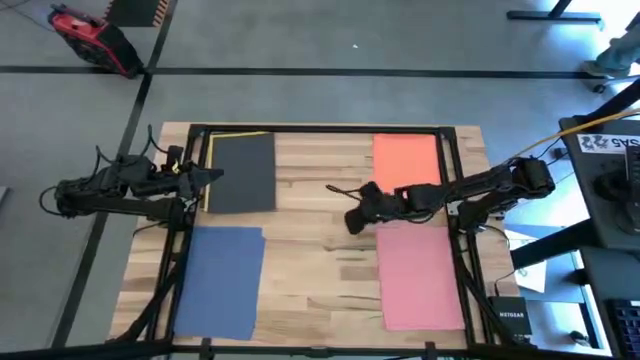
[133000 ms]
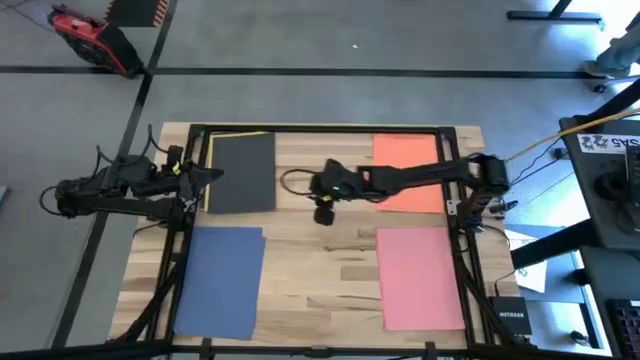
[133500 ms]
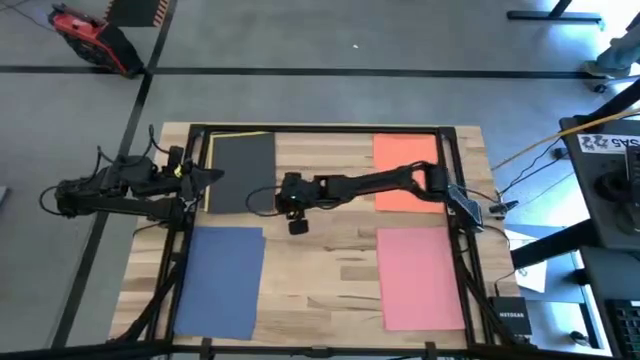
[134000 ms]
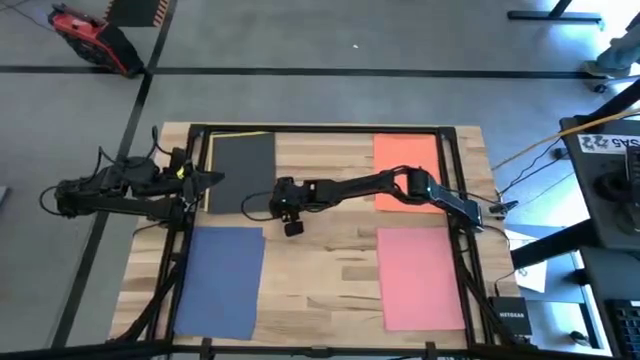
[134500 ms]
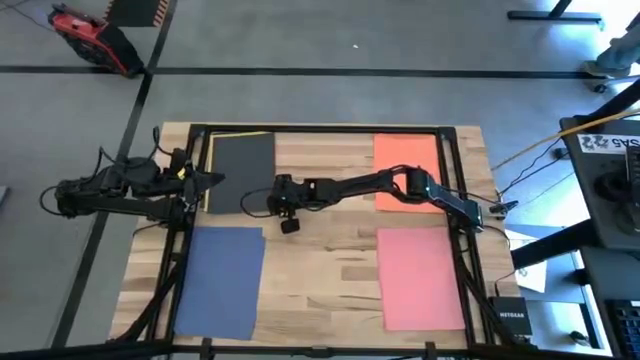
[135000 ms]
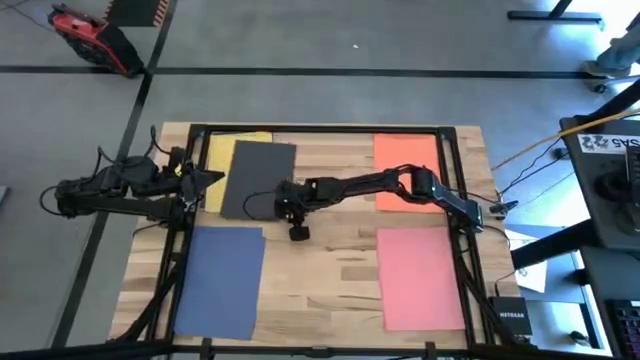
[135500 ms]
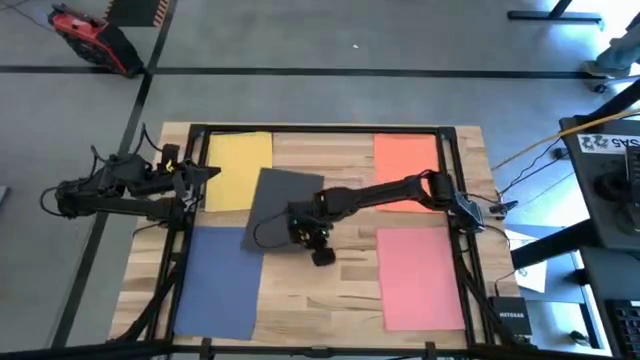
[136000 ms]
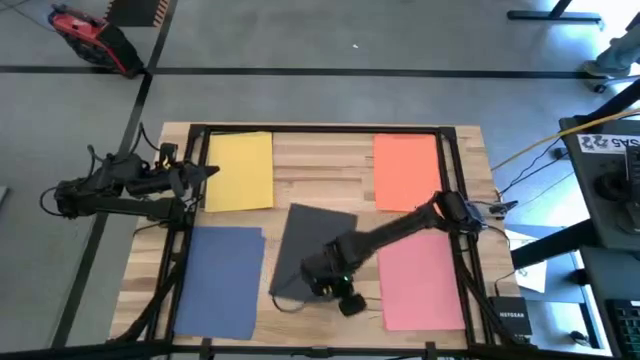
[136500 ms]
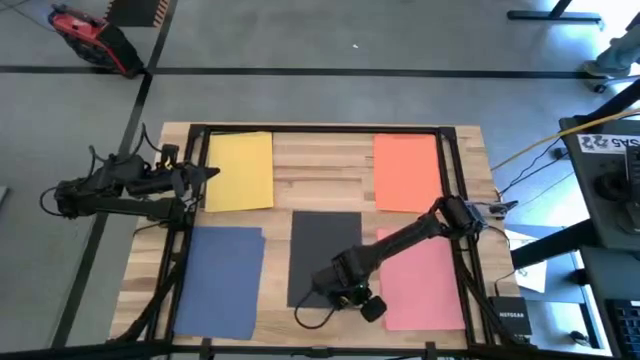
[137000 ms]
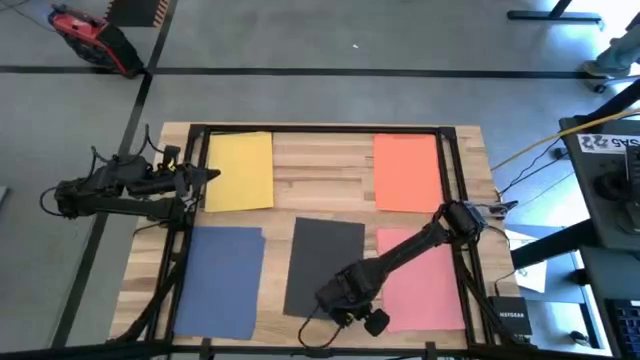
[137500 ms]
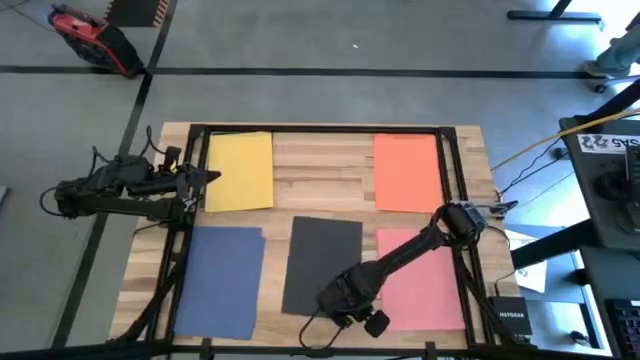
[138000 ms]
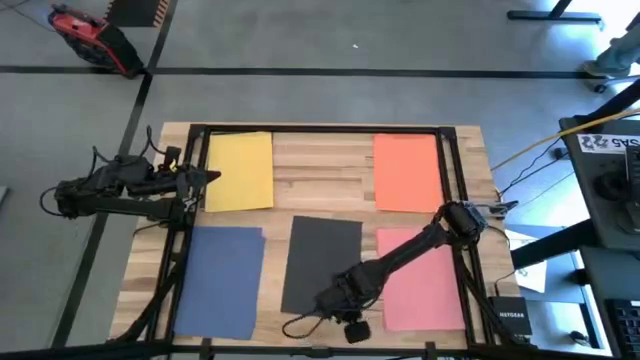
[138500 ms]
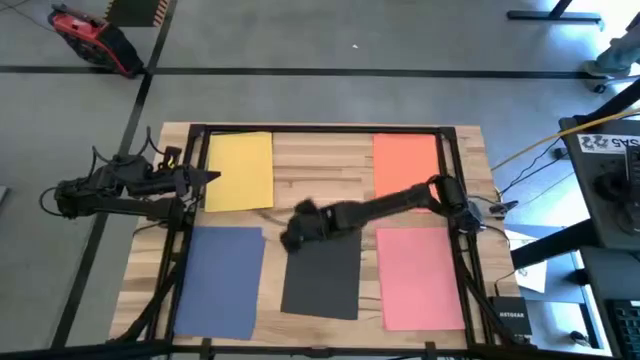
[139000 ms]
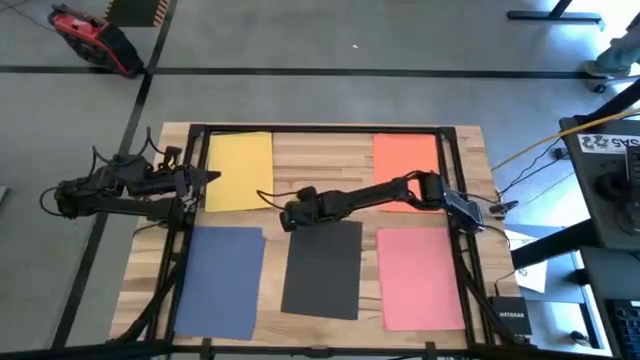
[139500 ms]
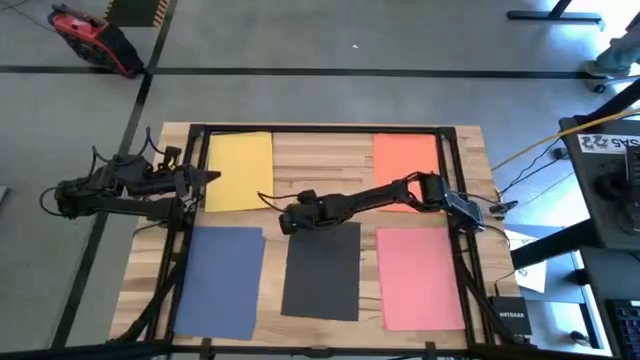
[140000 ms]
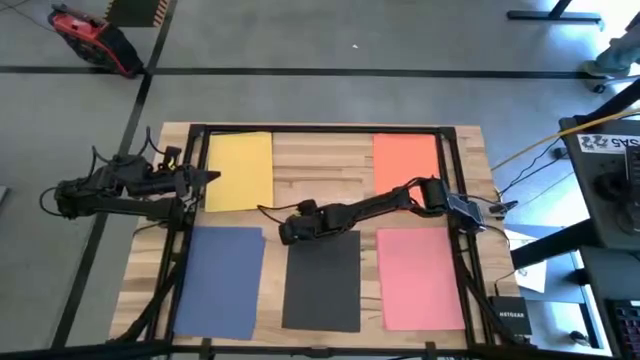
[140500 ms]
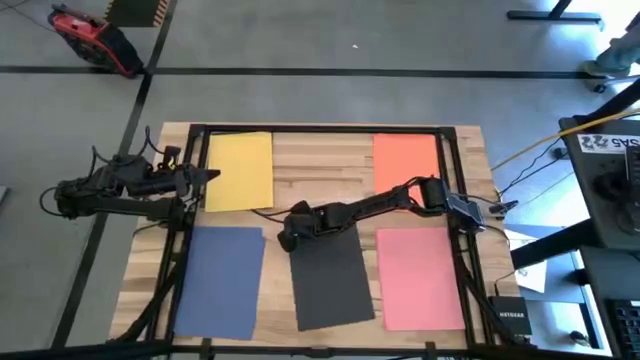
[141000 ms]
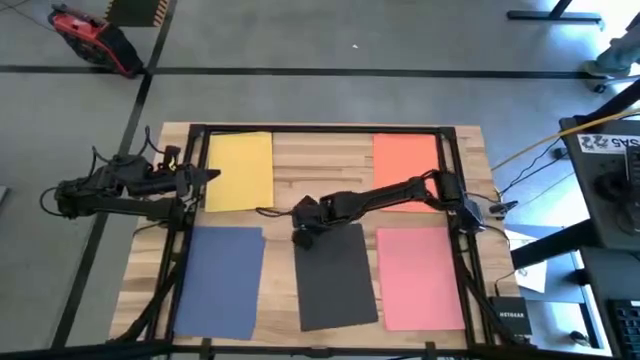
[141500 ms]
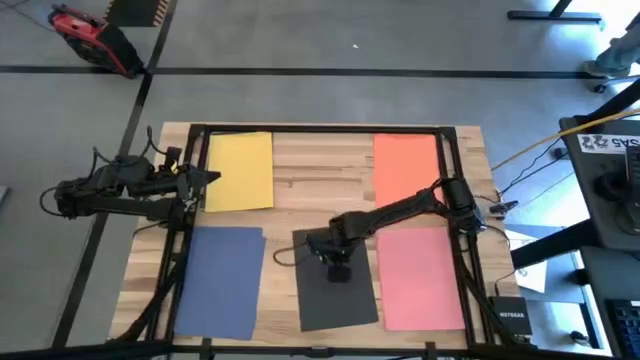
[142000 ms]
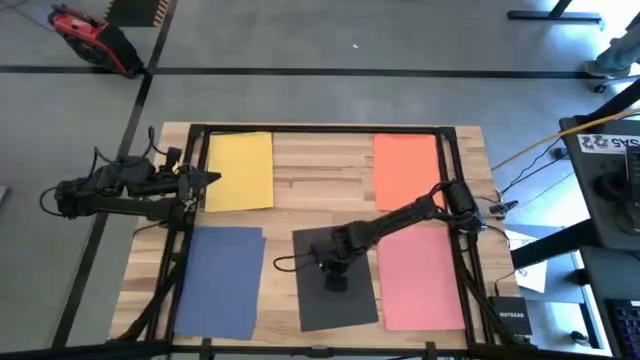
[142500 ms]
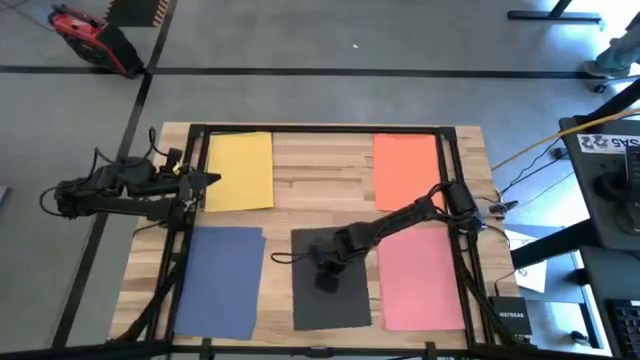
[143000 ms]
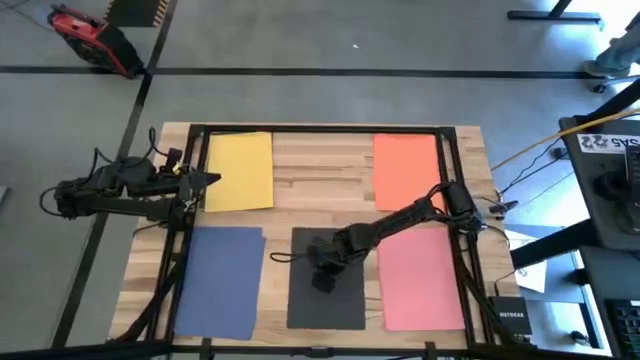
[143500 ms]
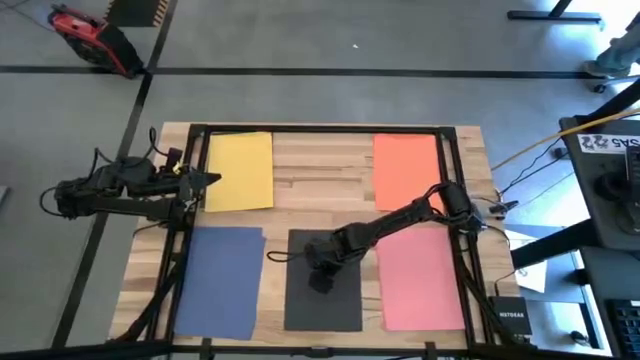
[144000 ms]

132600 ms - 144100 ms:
Task: Organize paper
Move the black colored paper on the bottom center of the table

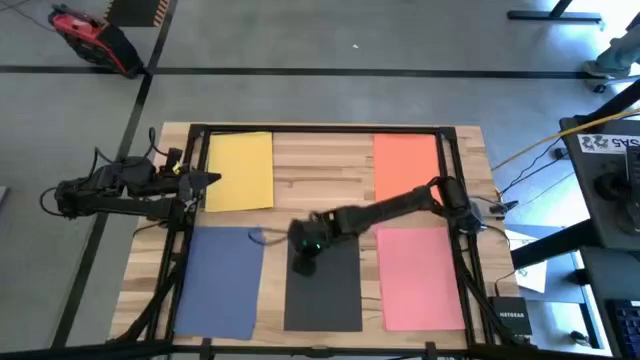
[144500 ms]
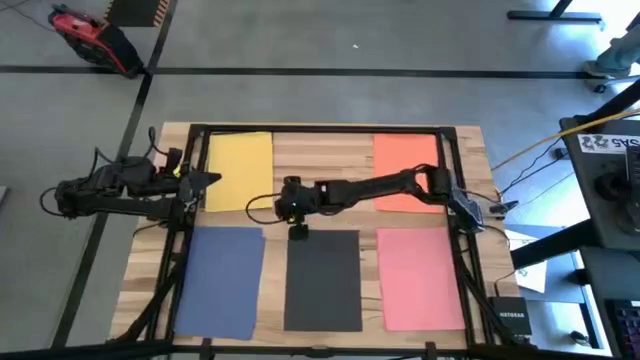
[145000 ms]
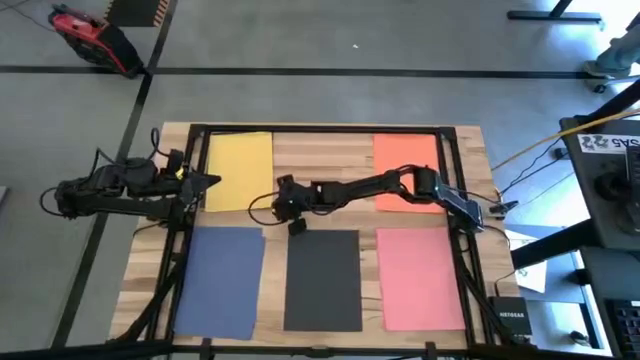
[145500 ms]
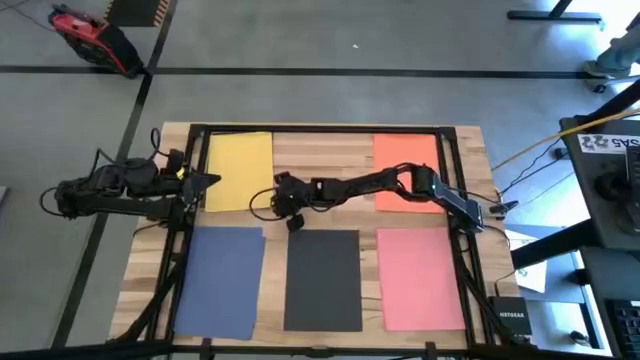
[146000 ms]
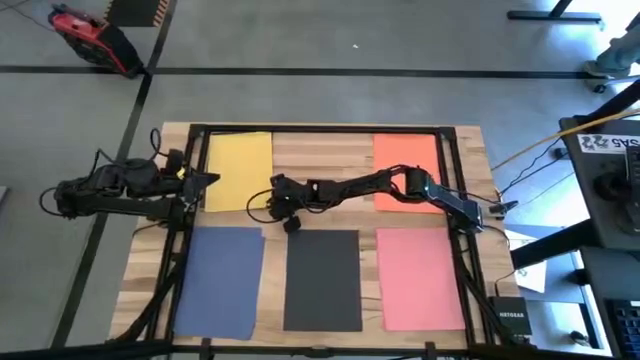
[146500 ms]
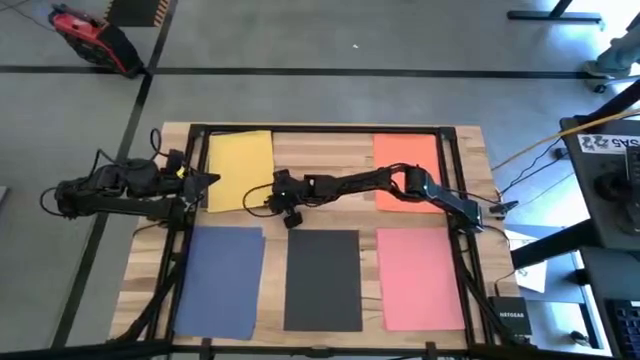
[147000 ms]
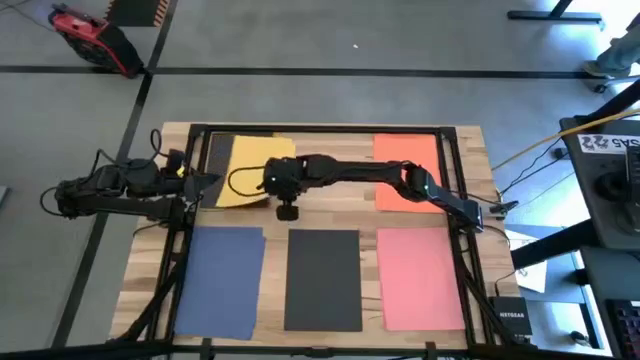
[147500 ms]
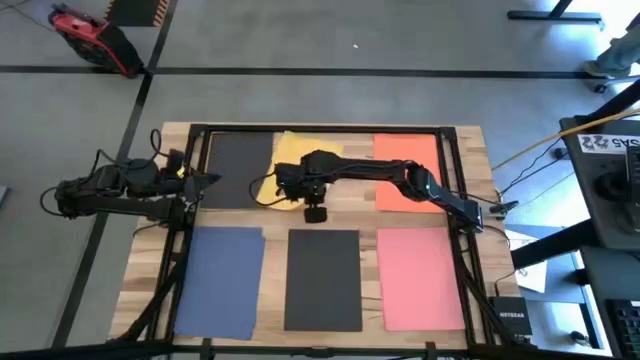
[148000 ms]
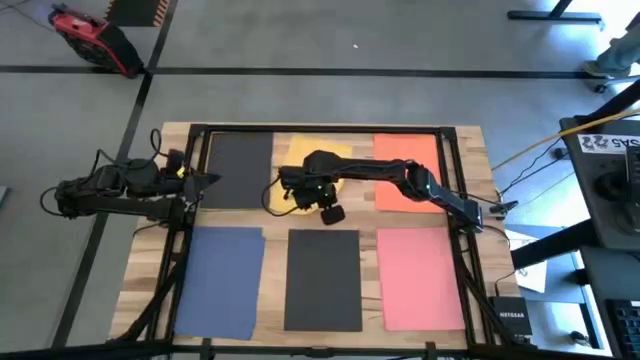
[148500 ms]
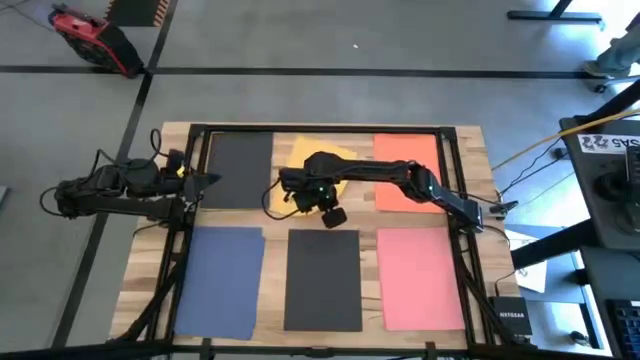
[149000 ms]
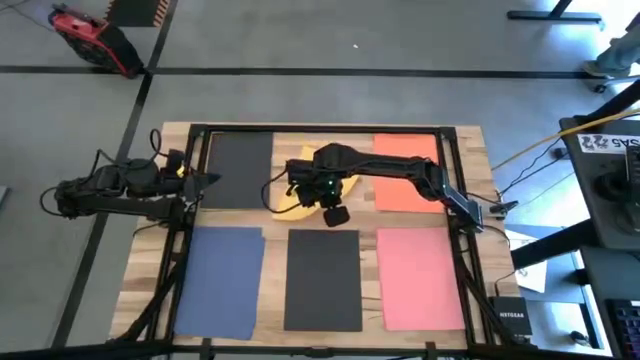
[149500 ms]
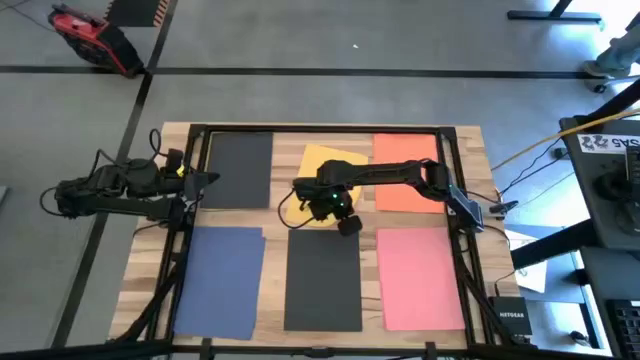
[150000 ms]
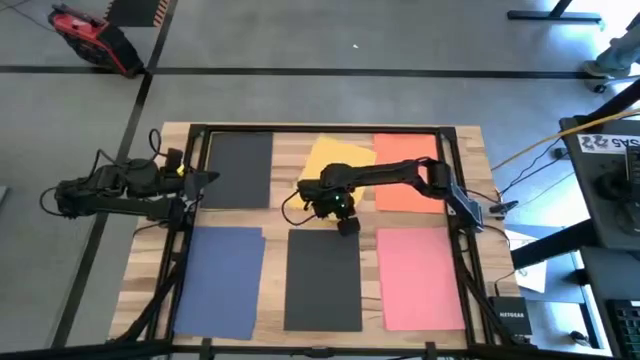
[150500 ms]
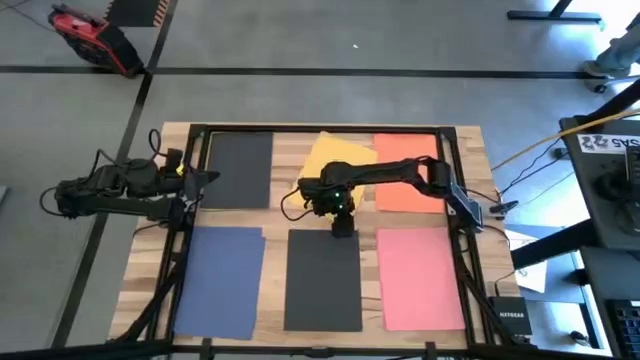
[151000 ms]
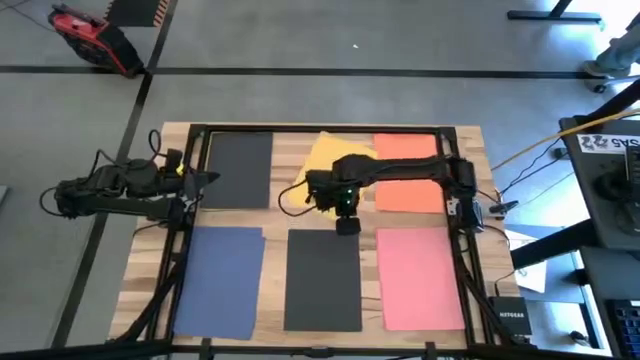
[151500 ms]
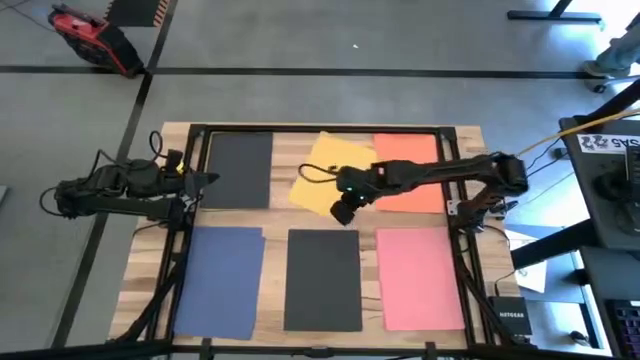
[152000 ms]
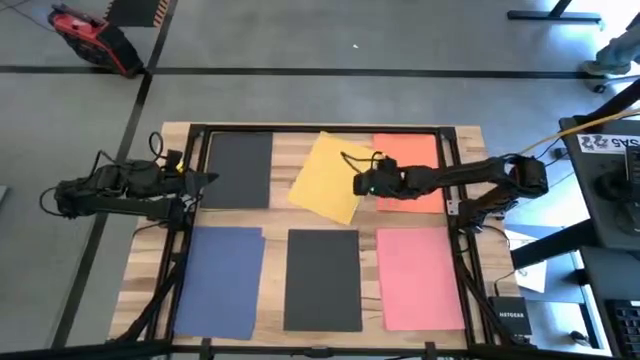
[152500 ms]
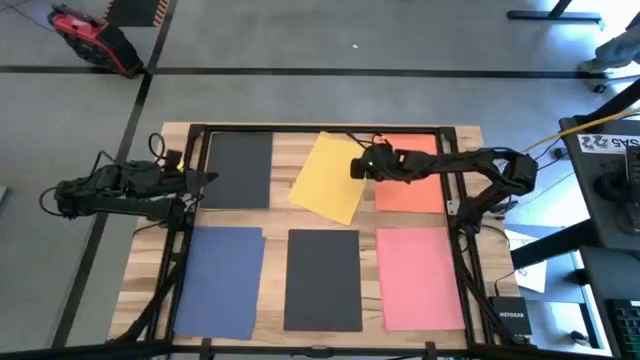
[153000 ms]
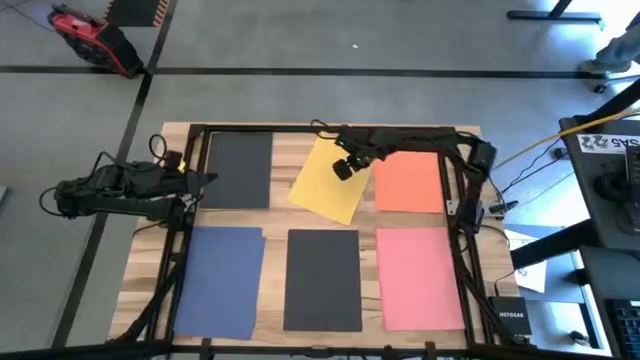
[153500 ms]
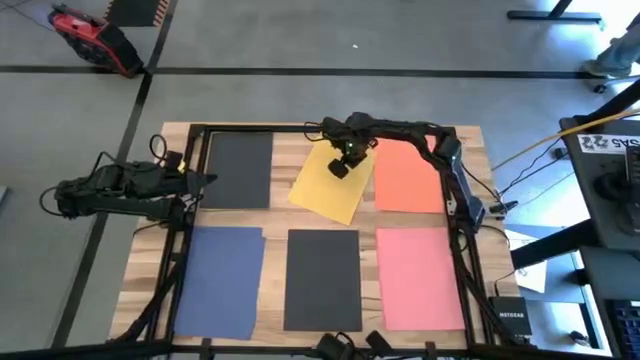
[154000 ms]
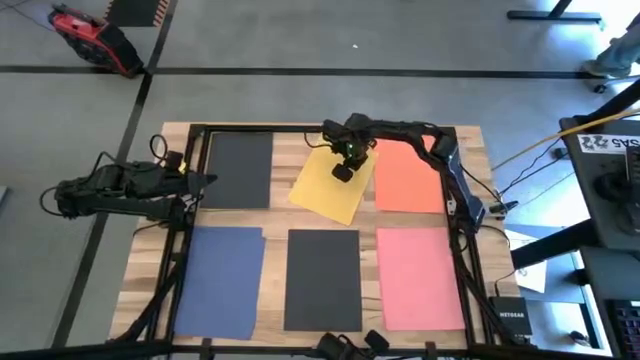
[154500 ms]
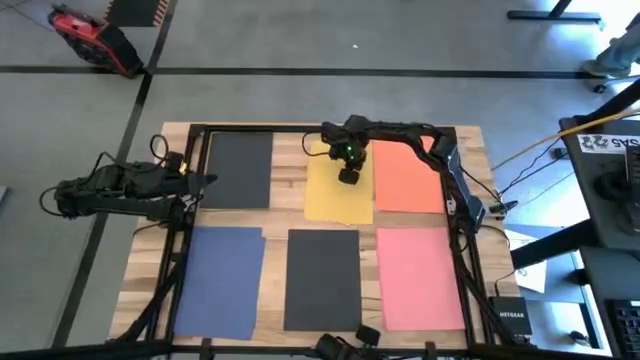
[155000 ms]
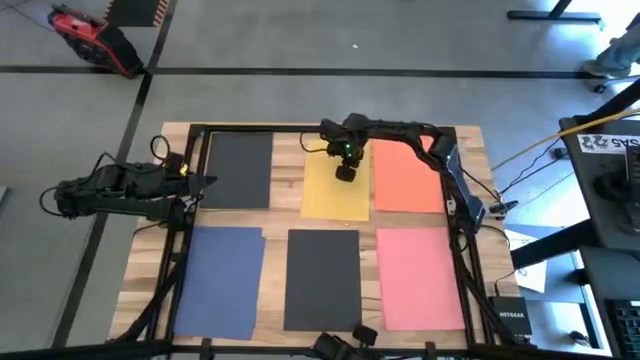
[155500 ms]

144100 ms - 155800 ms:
Move the yellow colored paper on the top center of the table
